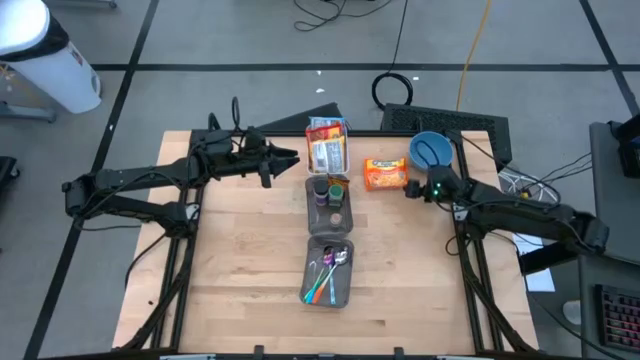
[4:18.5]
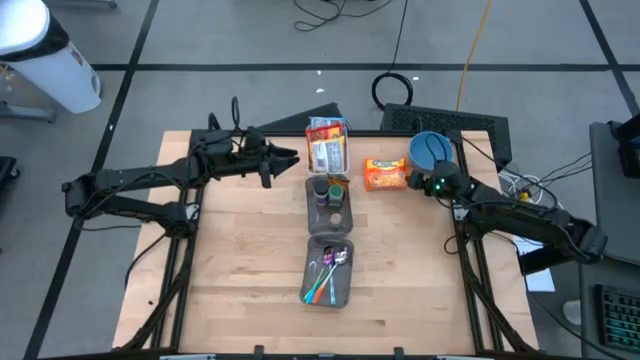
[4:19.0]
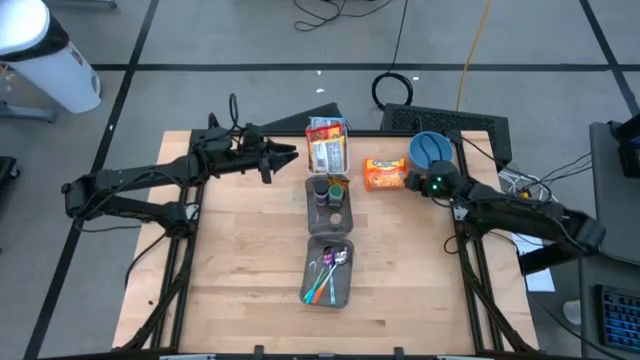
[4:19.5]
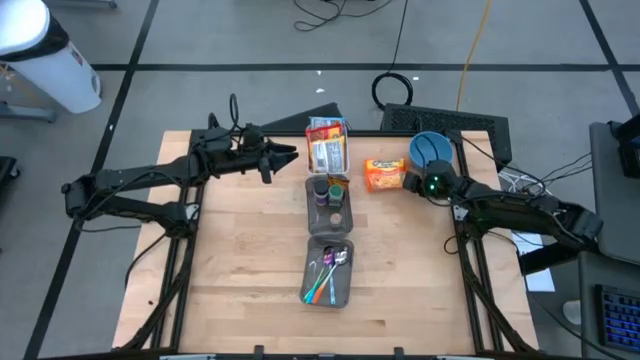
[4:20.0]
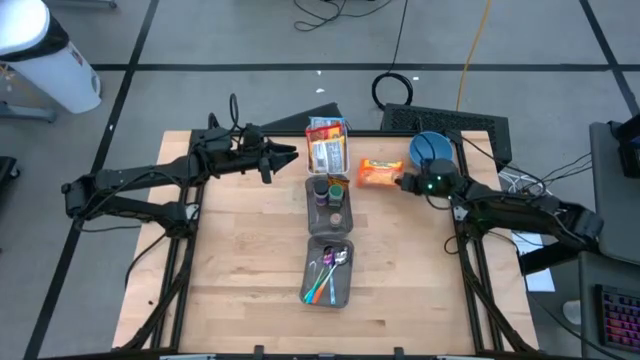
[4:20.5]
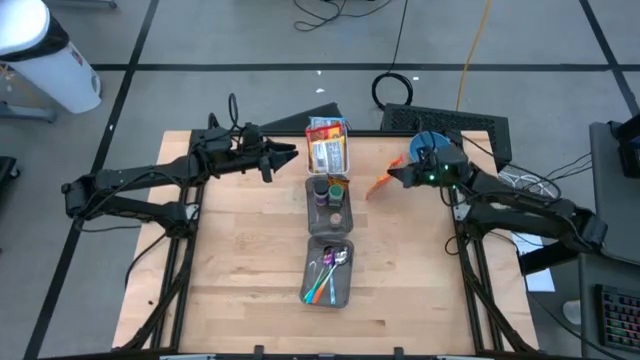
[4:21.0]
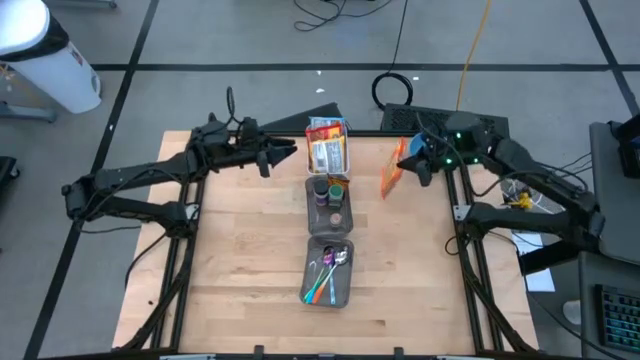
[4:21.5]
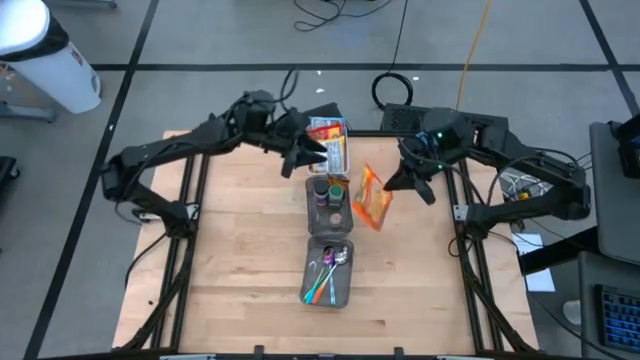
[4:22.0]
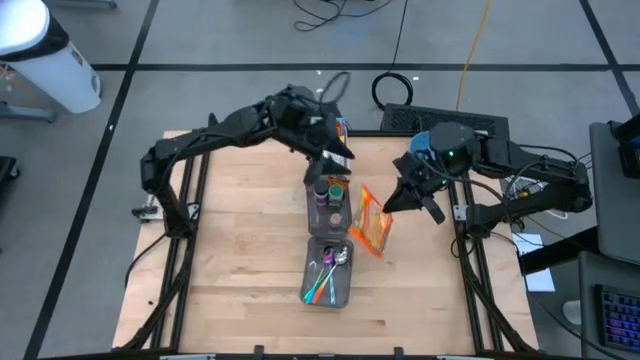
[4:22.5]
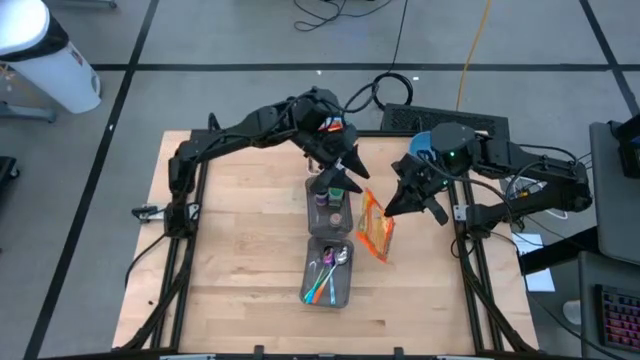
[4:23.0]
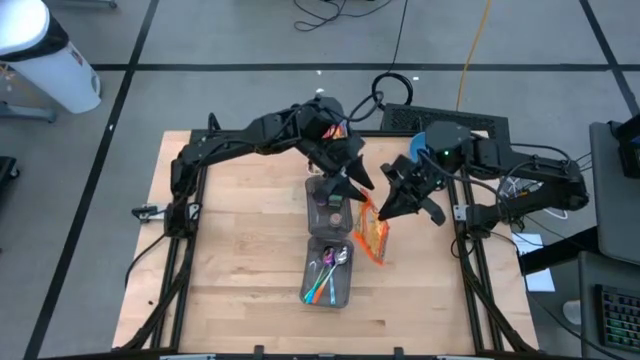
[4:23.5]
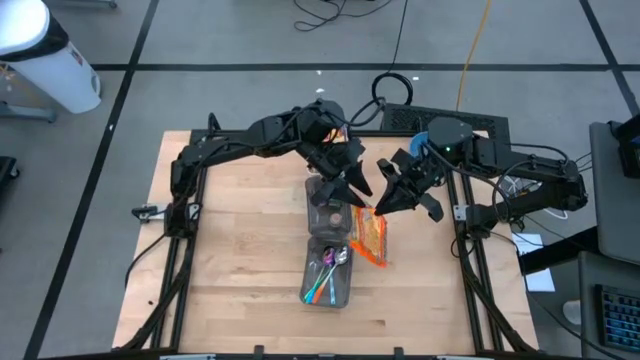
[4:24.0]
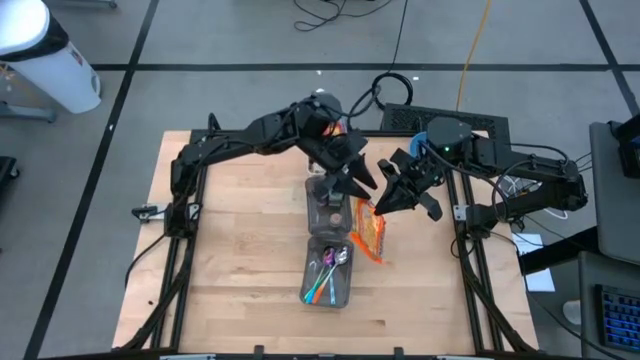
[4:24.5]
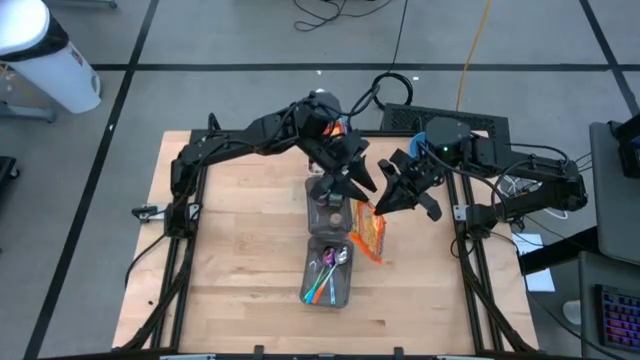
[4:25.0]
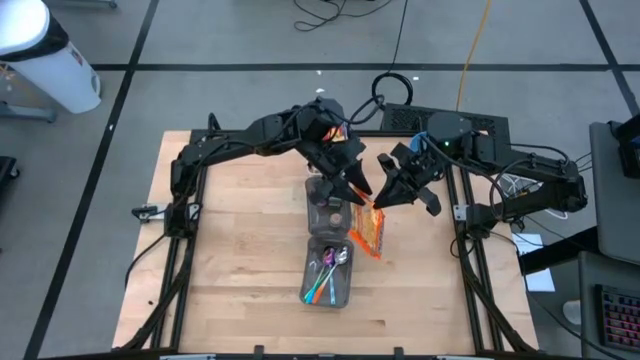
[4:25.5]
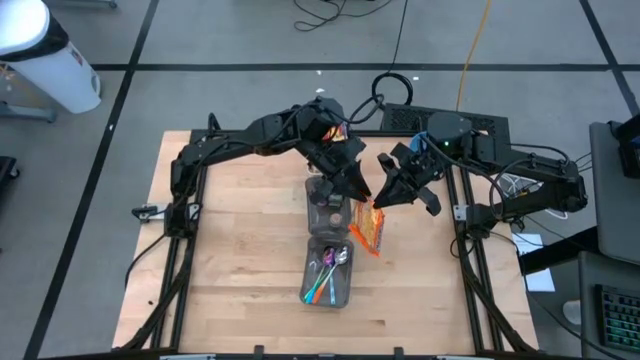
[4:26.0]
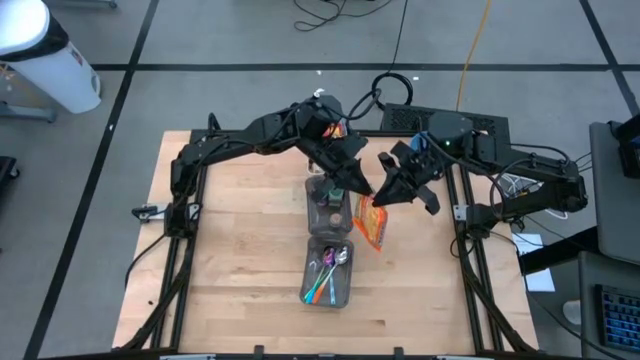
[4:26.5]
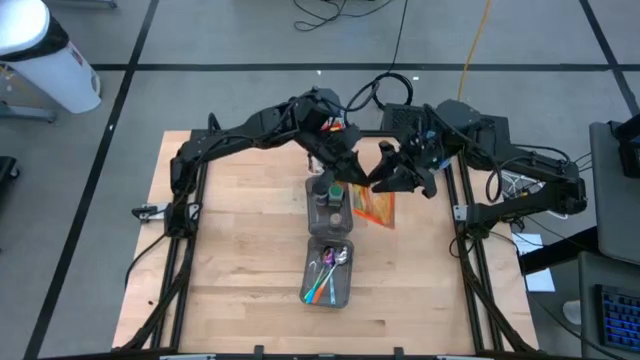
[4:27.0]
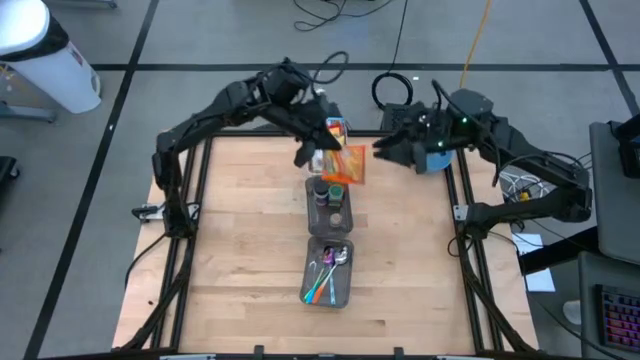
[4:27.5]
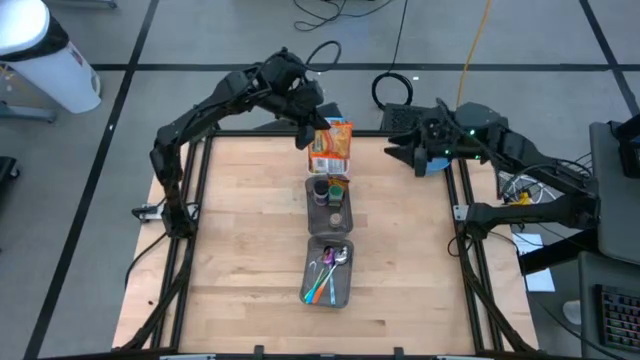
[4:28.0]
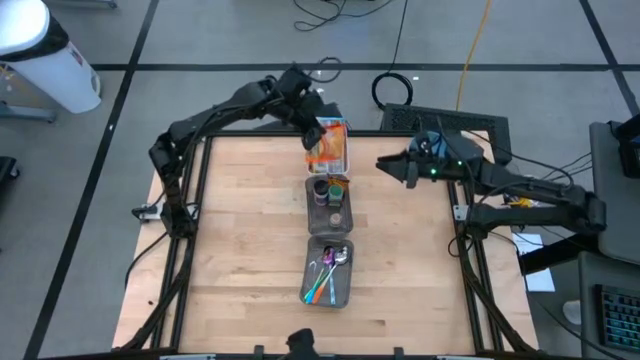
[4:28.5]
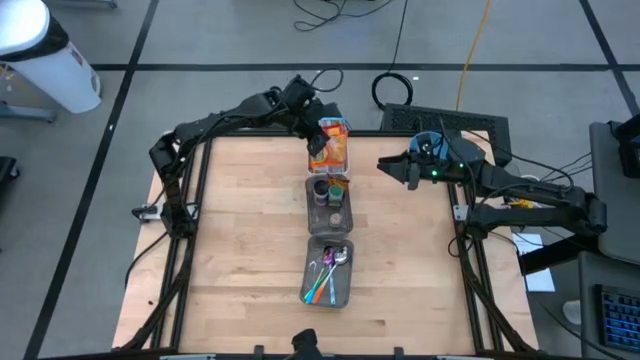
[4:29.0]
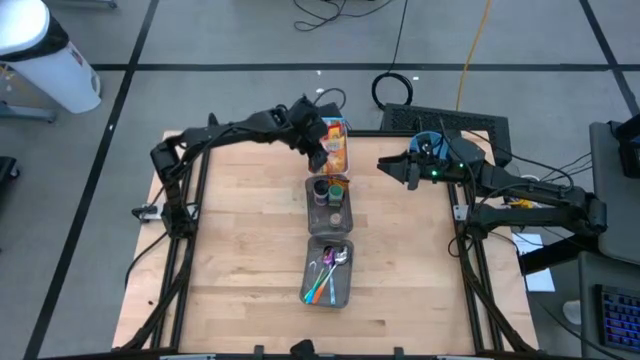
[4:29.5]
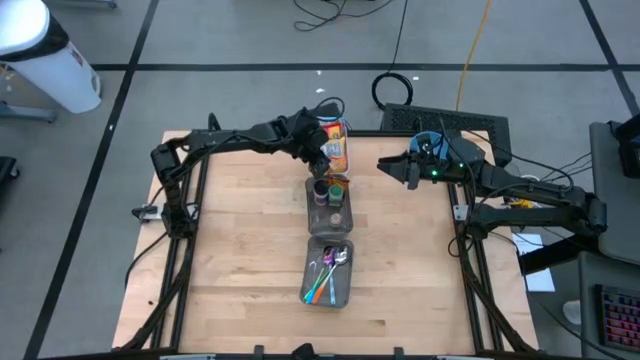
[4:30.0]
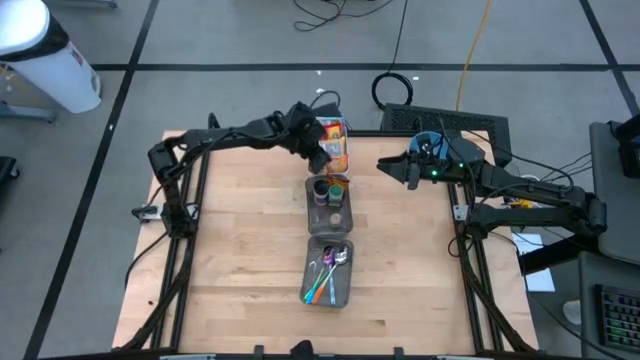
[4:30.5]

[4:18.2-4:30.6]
Task: Pick & Place Food Item
Put the orange noodle pack into the white bin

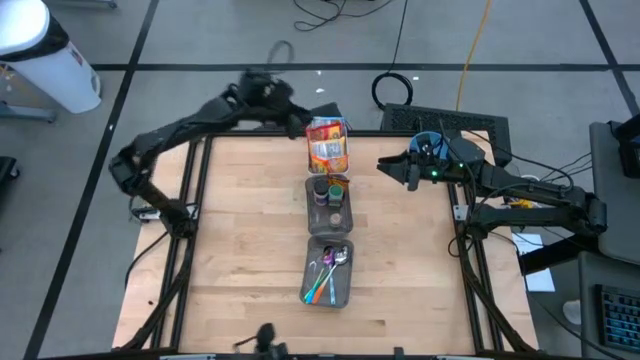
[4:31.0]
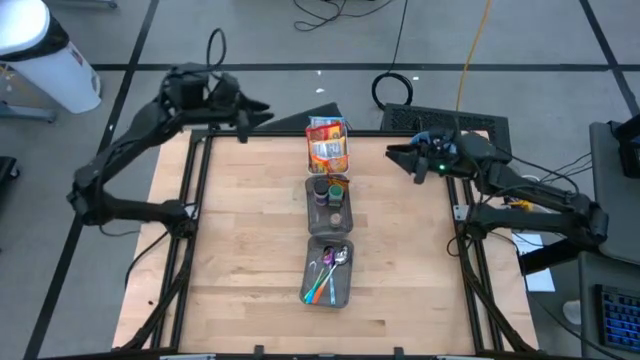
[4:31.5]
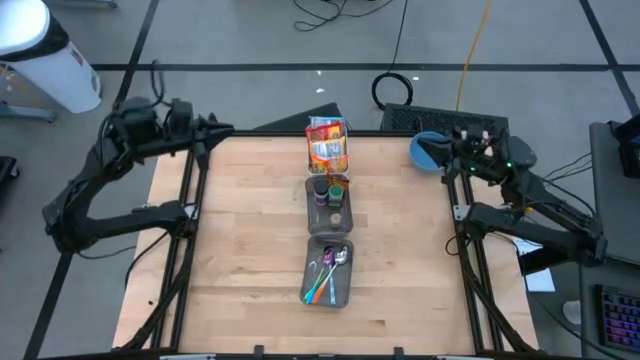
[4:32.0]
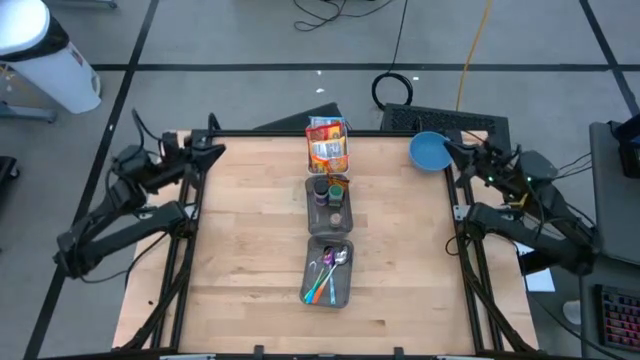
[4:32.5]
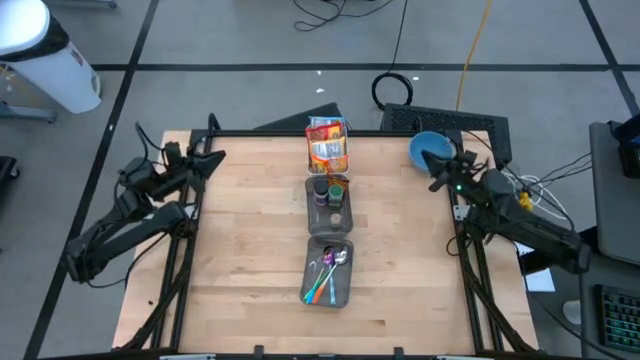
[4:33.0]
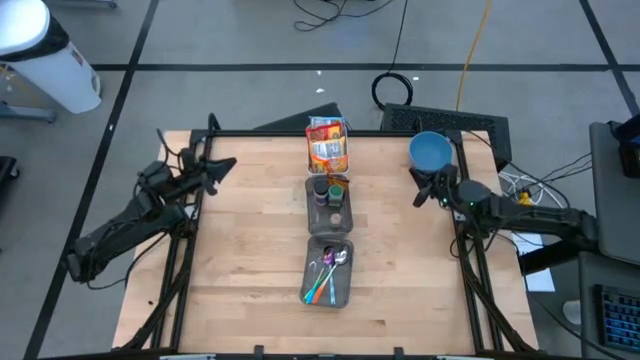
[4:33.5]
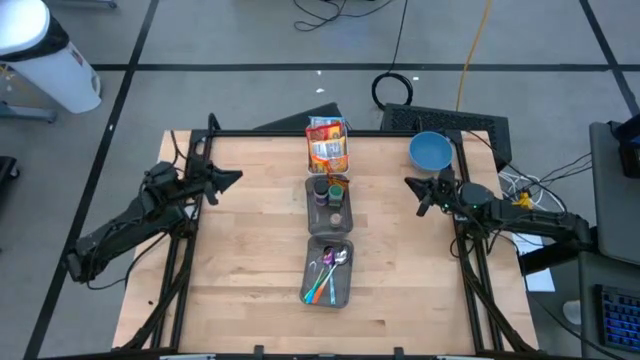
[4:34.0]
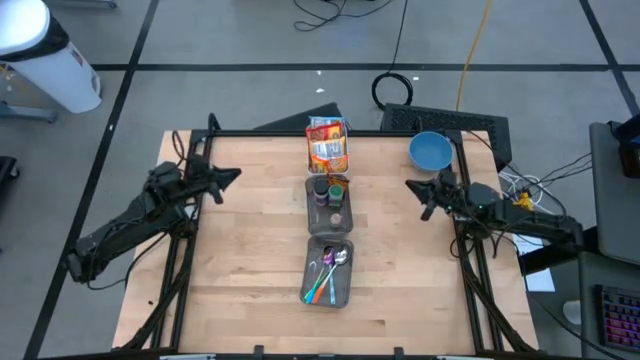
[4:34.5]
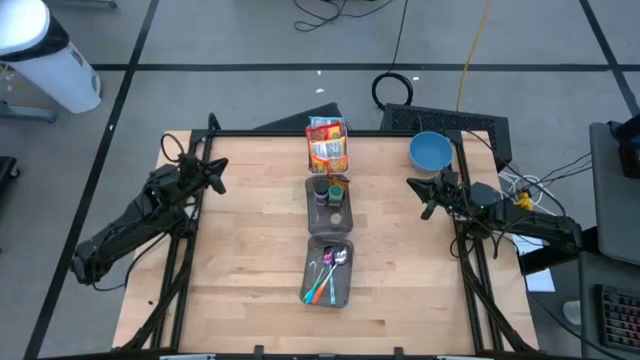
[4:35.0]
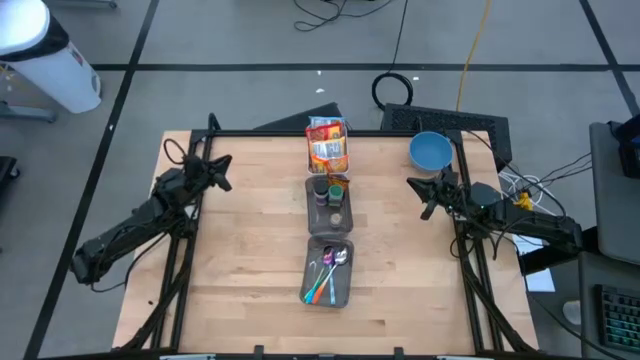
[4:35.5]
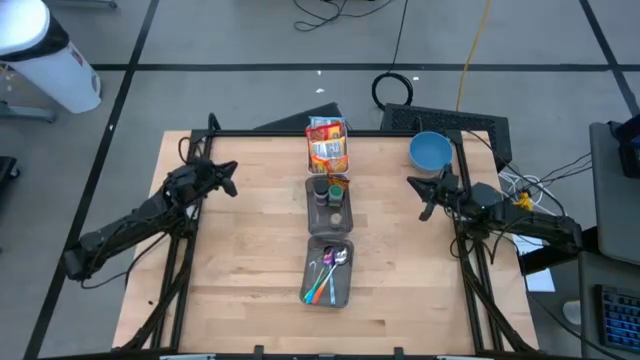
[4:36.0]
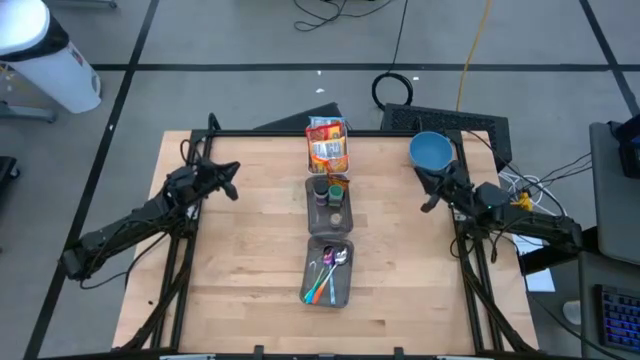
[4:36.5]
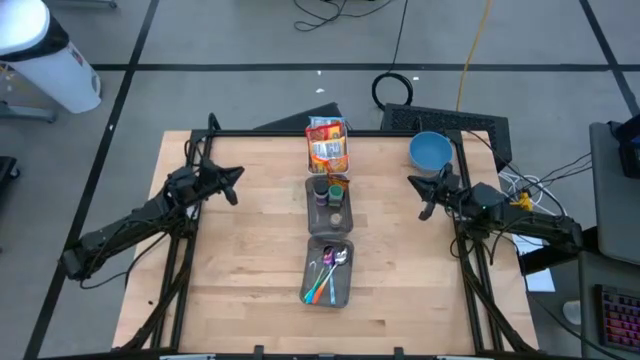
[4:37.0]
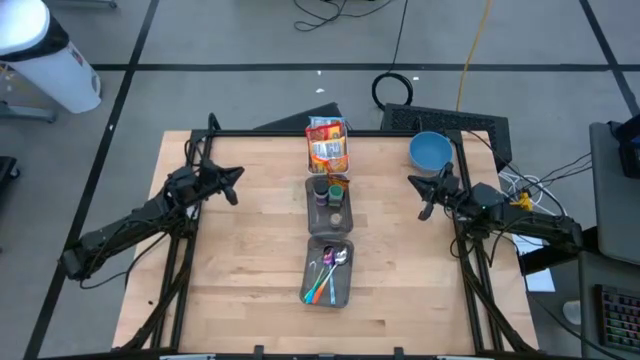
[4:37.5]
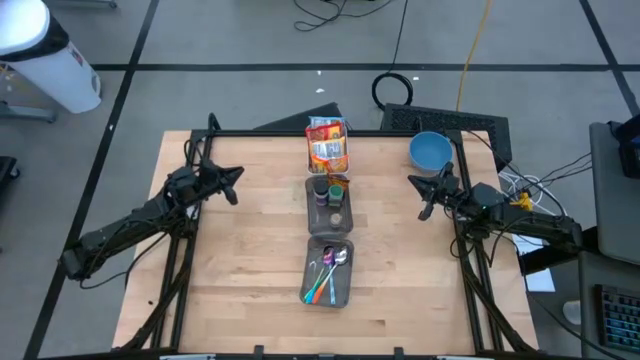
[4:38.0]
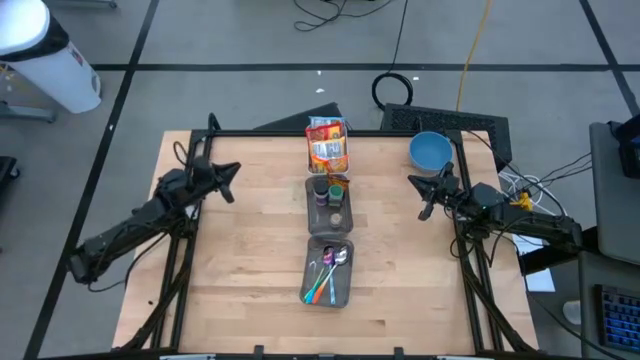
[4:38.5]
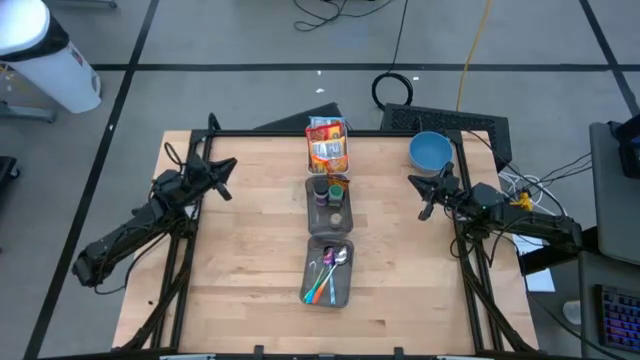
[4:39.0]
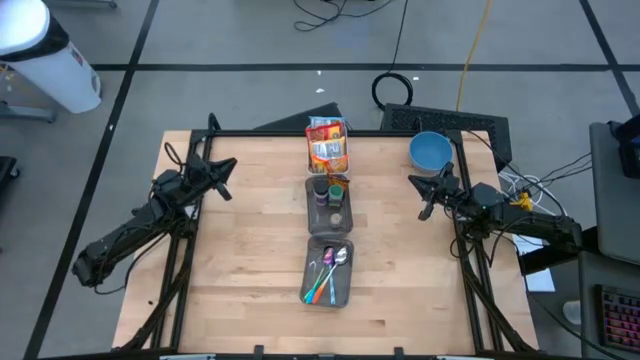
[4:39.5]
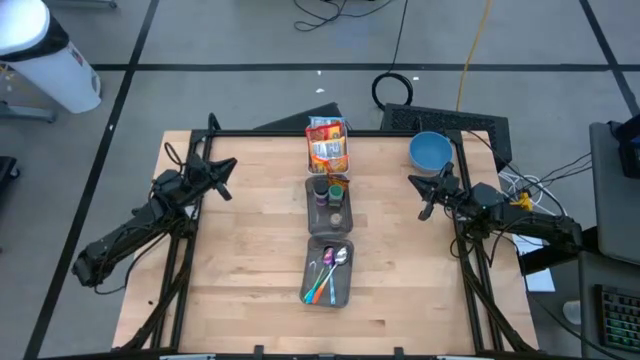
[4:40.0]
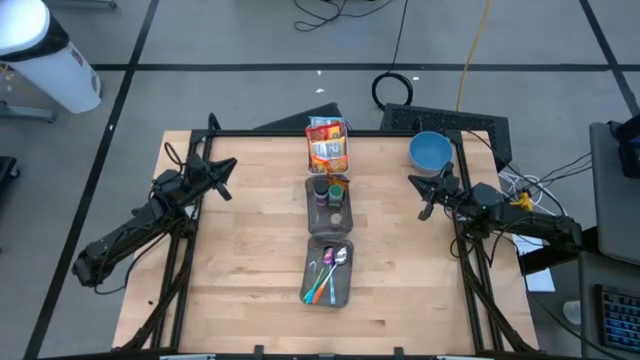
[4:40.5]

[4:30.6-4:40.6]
Return to Home Position
